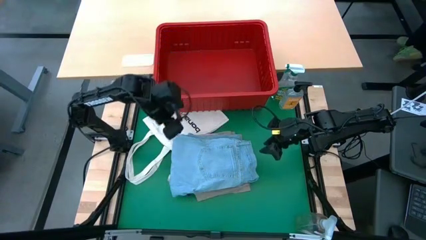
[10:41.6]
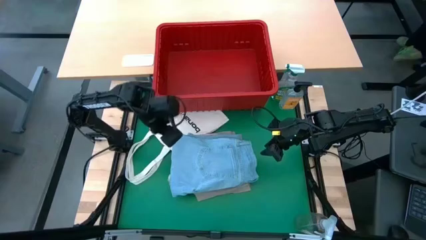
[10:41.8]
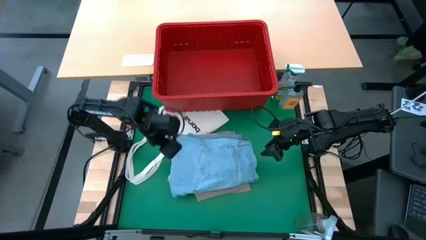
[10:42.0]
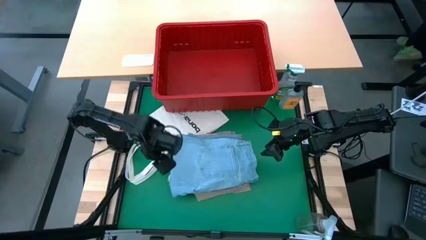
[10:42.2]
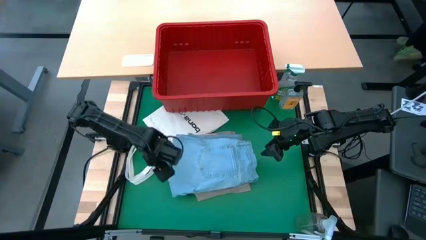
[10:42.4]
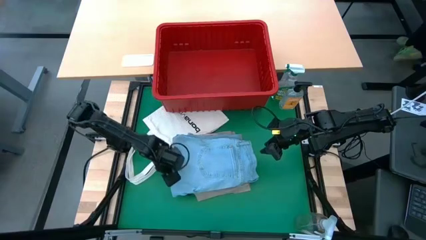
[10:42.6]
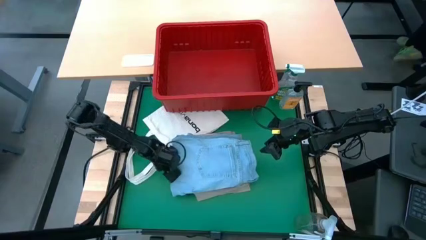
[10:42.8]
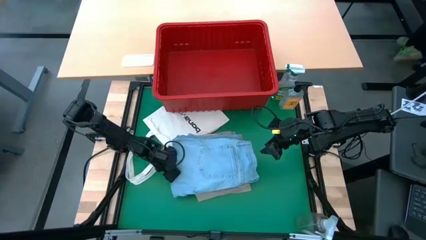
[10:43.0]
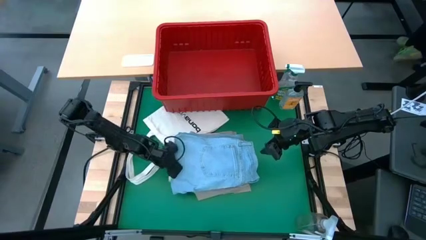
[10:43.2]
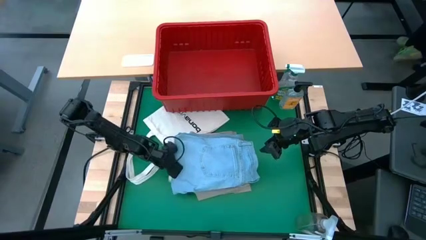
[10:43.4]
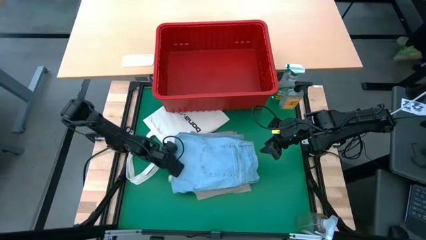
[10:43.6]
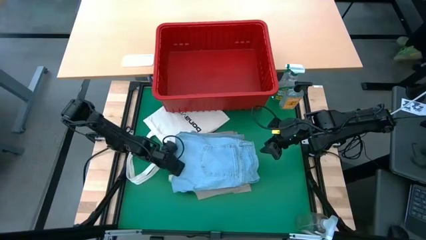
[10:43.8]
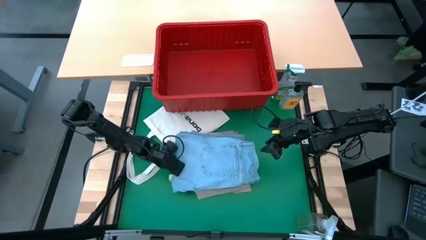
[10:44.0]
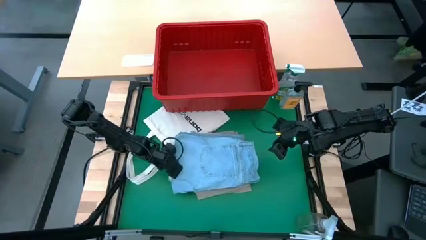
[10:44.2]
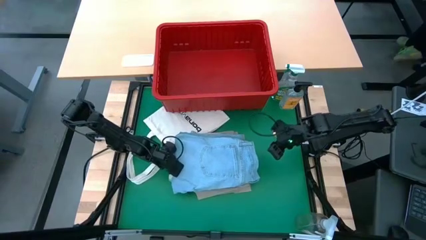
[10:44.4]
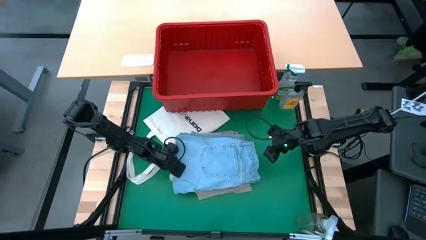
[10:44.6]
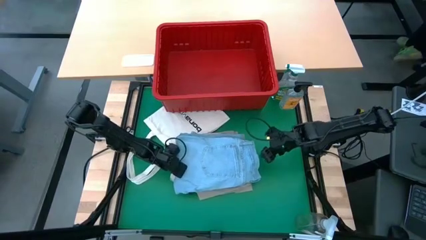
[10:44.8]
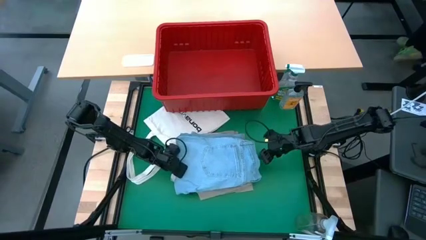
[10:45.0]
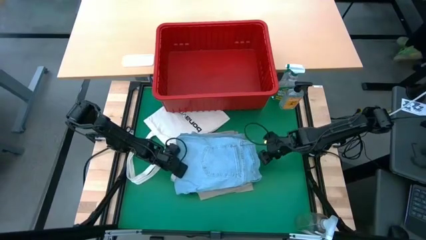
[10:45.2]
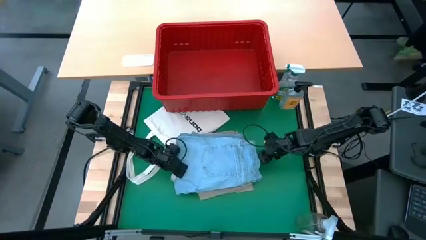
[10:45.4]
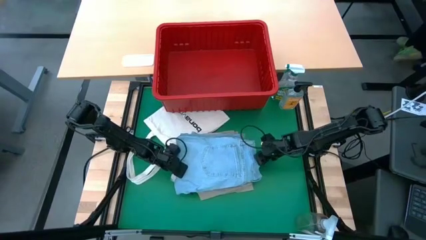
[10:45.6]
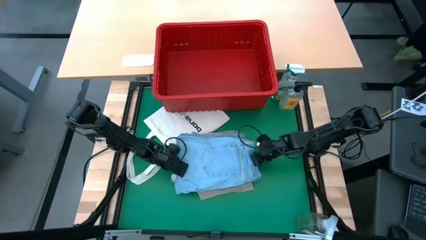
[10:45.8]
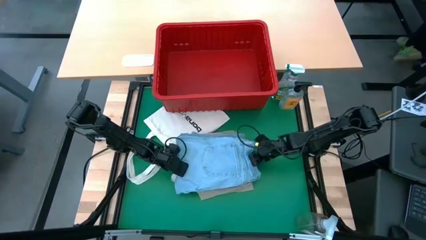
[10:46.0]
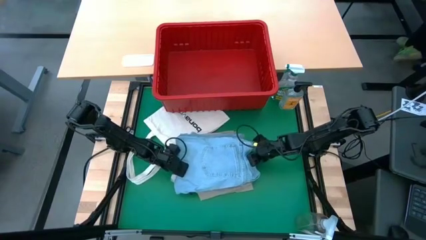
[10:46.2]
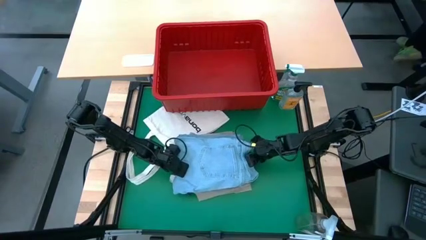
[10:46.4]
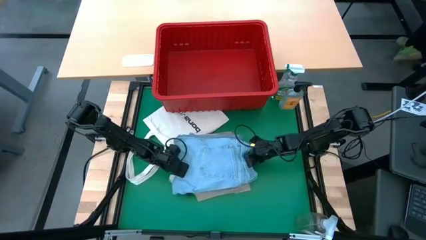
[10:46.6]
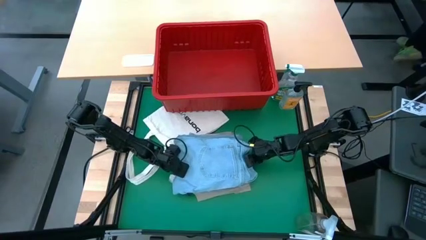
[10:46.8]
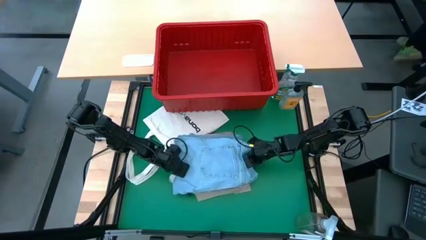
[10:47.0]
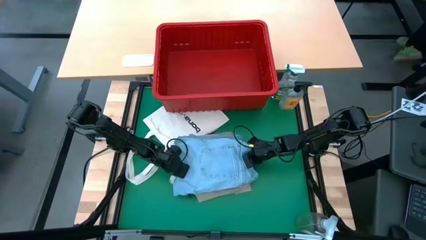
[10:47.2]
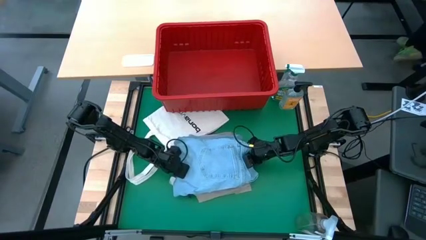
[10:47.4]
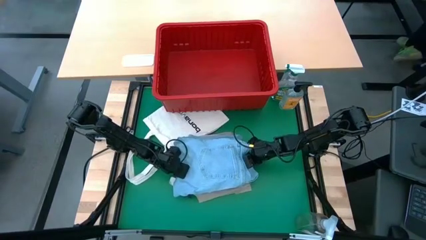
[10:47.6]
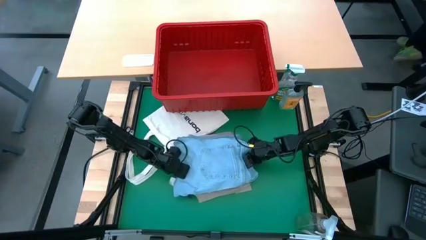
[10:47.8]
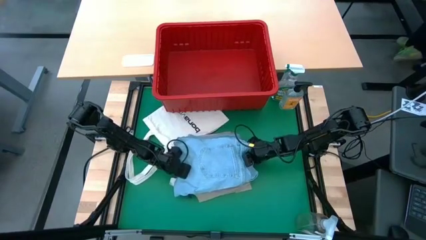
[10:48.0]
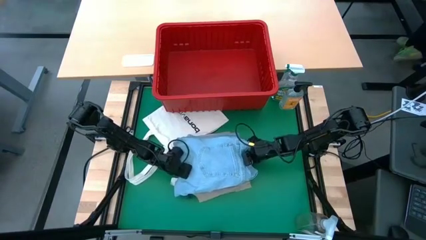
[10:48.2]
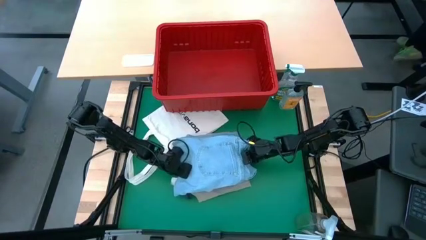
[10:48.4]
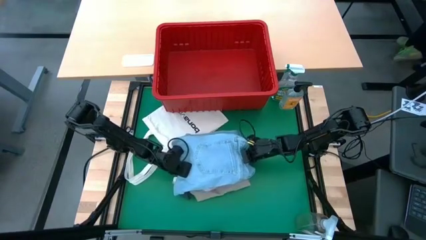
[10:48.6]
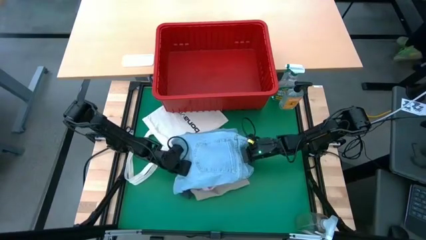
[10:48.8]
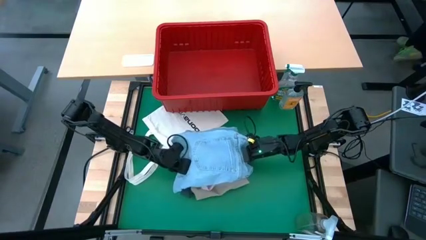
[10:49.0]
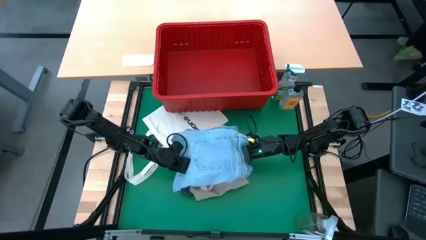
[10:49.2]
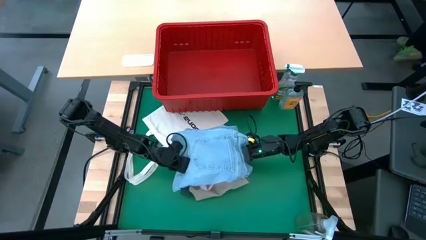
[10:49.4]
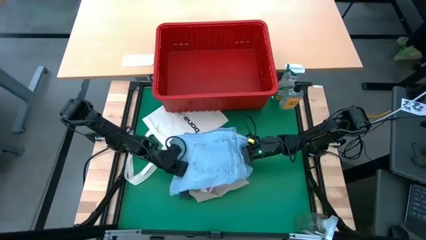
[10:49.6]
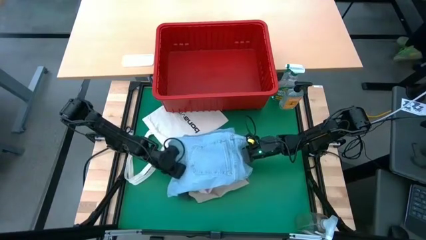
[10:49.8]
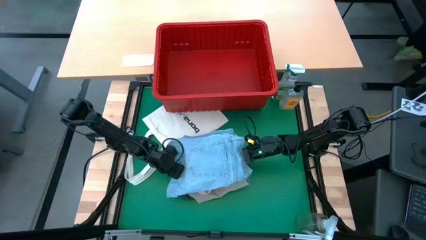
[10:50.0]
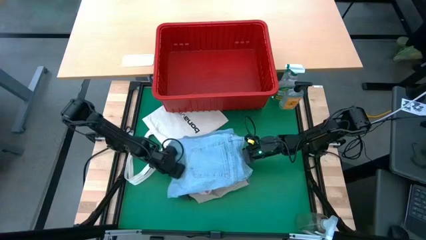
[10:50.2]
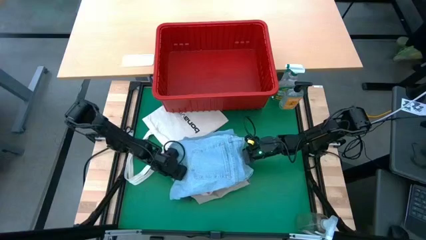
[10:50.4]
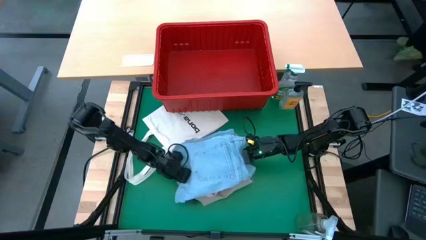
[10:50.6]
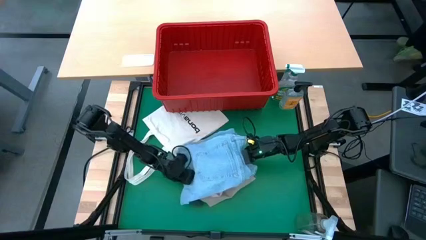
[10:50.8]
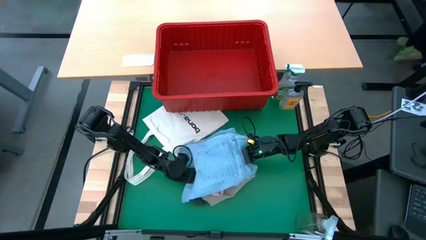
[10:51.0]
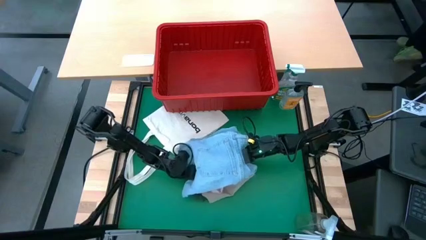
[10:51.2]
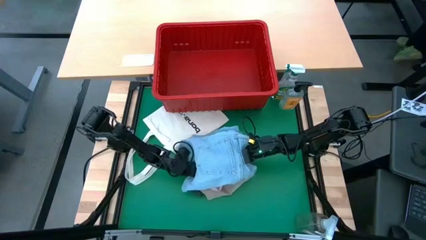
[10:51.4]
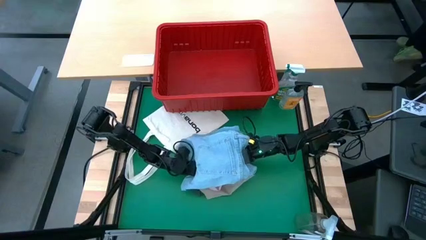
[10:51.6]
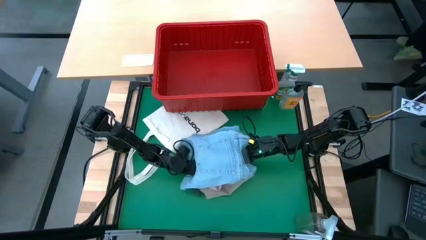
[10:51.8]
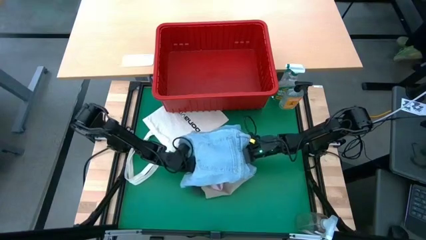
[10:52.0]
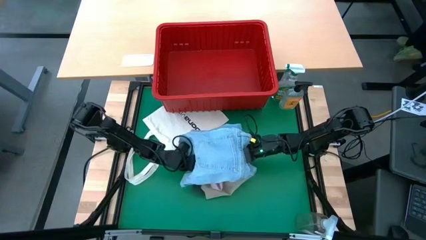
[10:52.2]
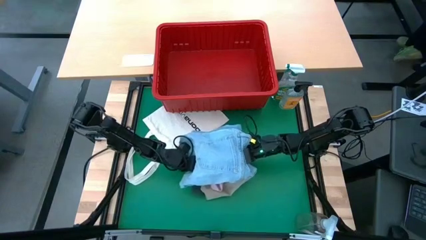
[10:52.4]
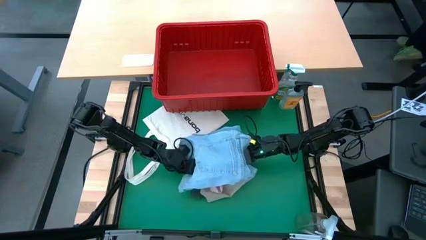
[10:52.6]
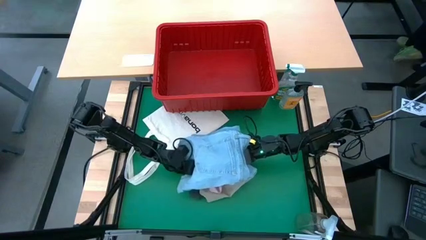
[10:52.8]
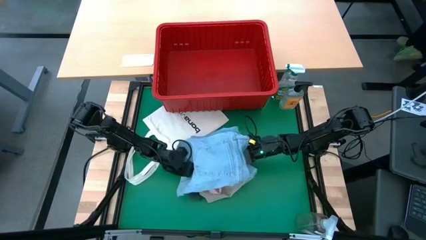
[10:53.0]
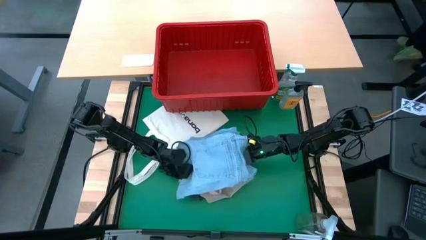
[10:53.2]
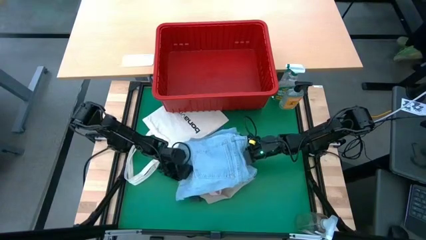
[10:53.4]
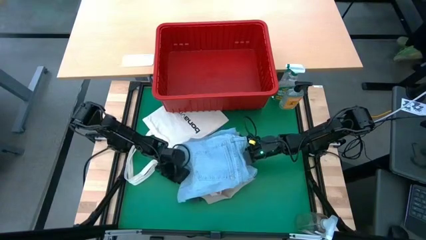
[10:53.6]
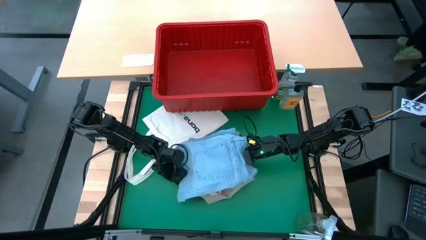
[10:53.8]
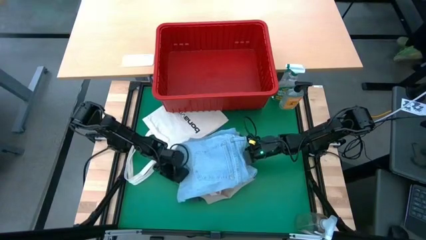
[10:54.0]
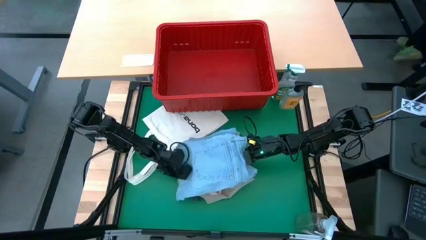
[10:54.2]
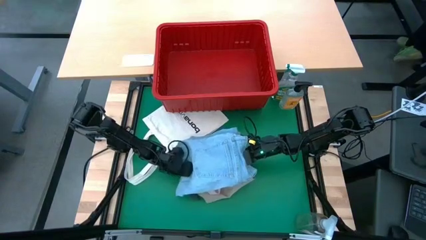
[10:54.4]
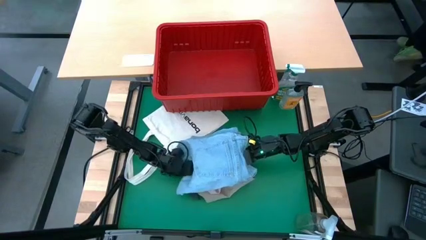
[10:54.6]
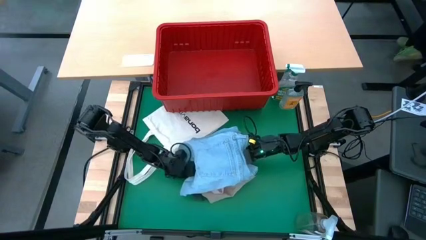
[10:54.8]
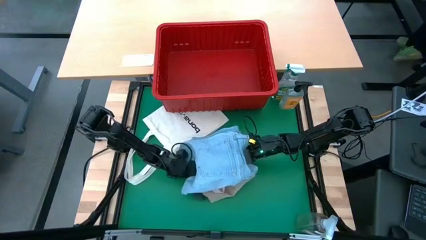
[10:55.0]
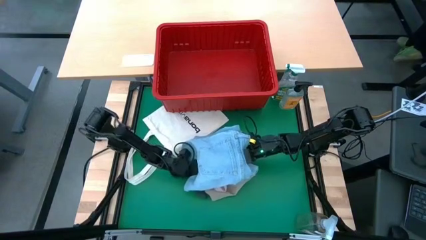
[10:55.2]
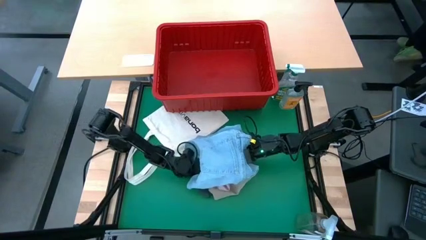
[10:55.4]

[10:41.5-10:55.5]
Task: Fold laundry
Put the stacked clothing into the red laundry bin
